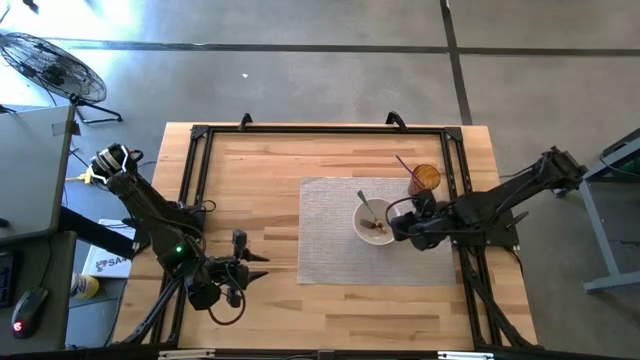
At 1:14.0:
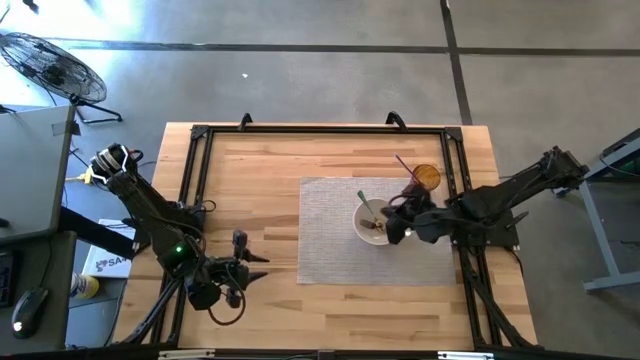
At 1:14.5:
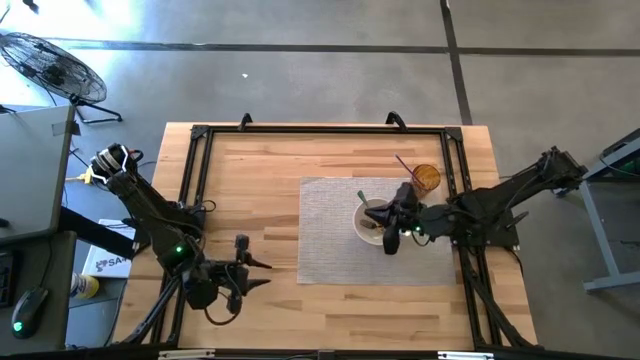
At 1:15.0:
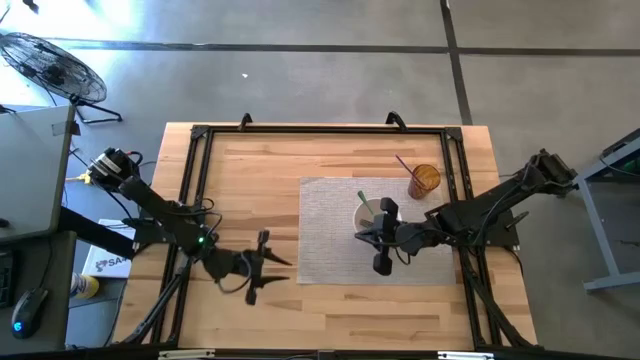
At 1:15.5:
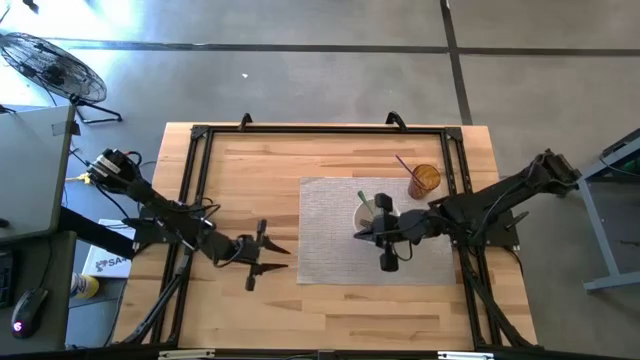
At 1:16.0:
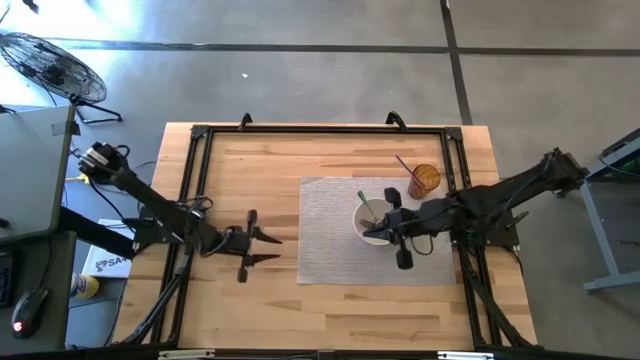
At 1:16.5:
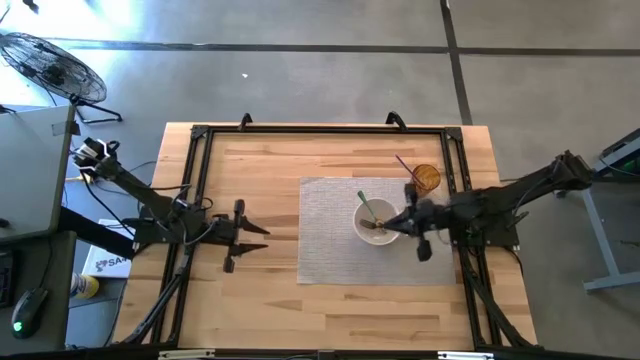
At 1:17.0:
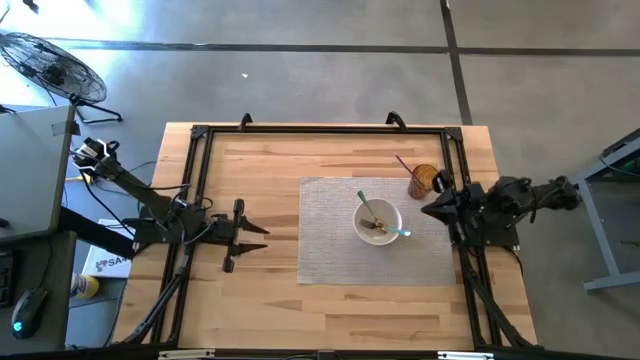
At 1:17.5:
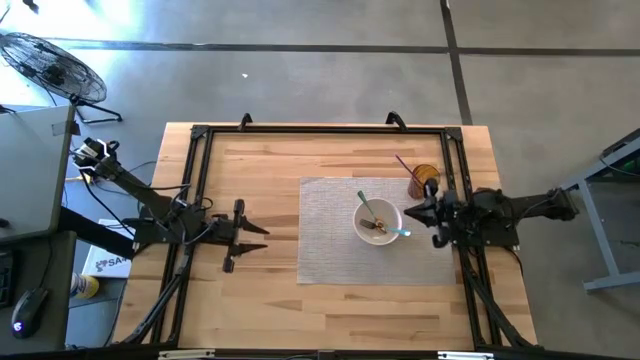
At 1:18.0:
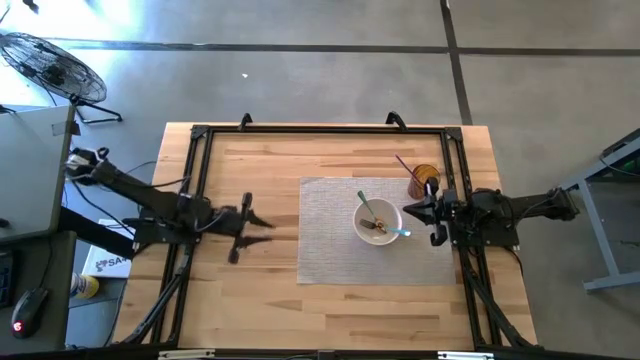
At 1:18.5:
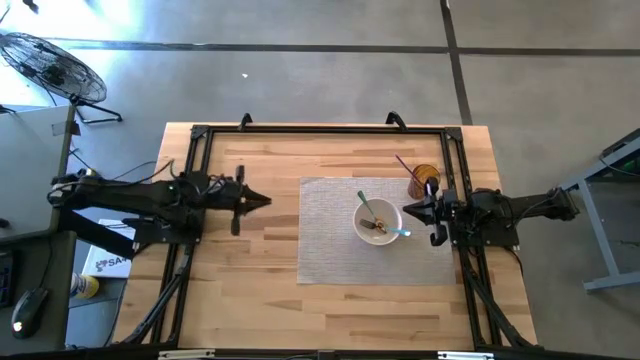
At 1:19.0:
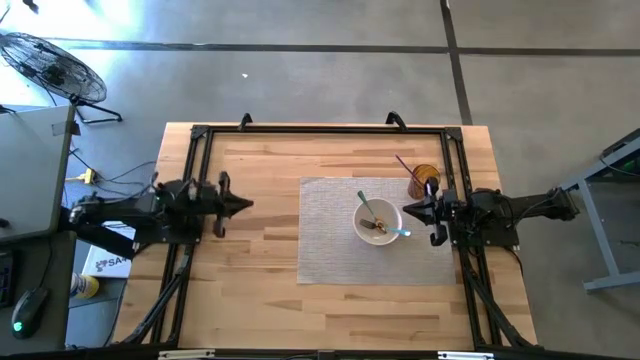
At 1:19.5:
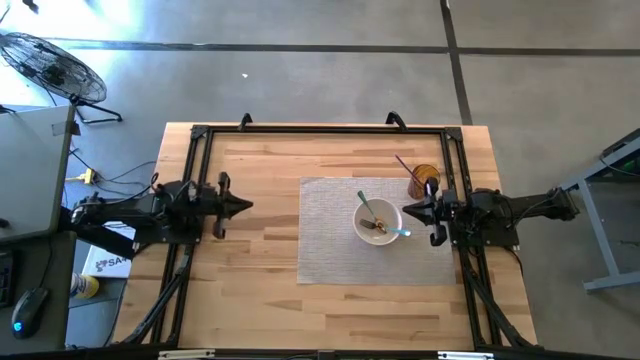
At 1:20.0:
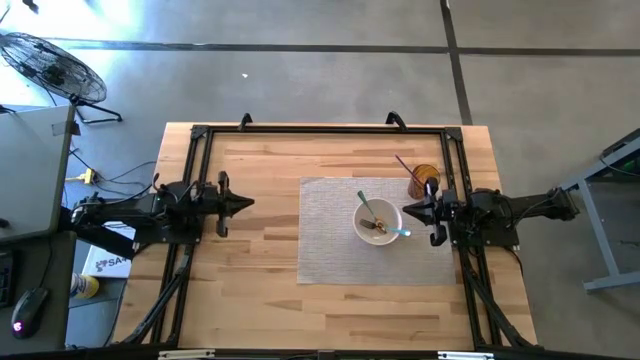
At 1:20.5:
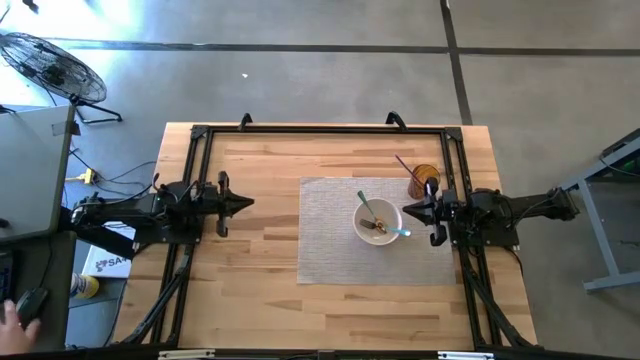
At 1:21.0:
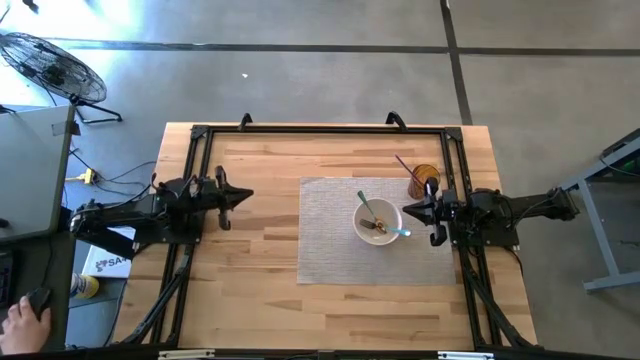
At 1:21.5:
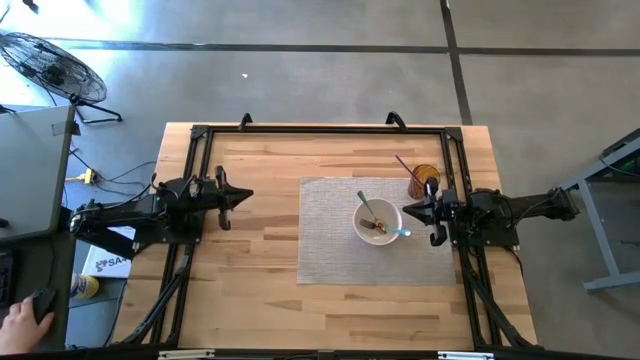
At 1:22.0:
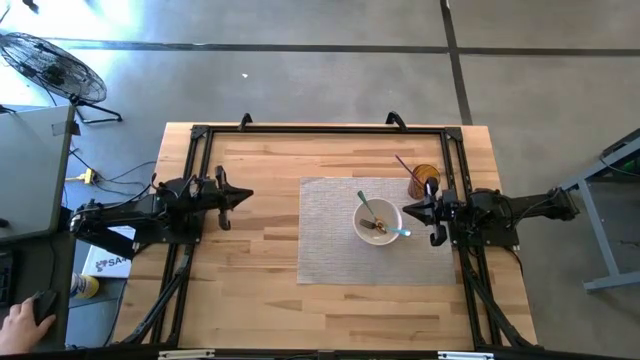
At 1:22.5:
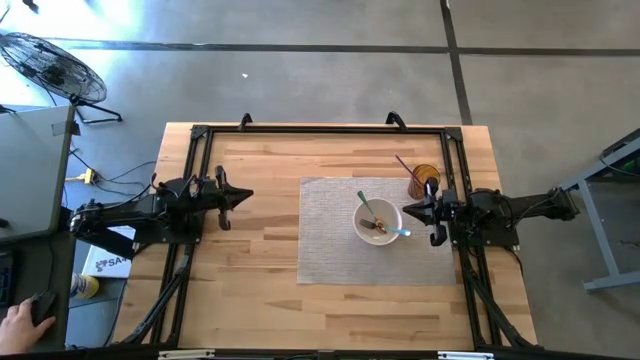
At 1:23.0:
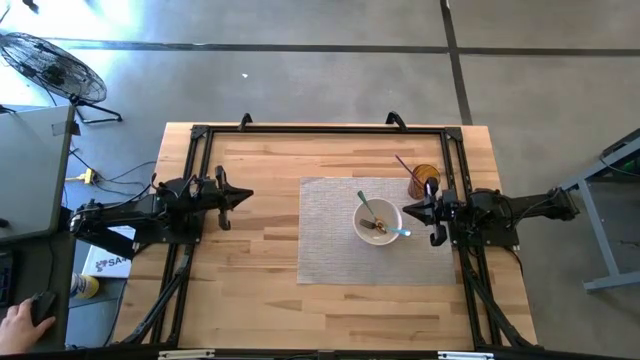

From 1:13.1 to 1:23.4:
Task: Pick & Place Utensil
Return to Home Position

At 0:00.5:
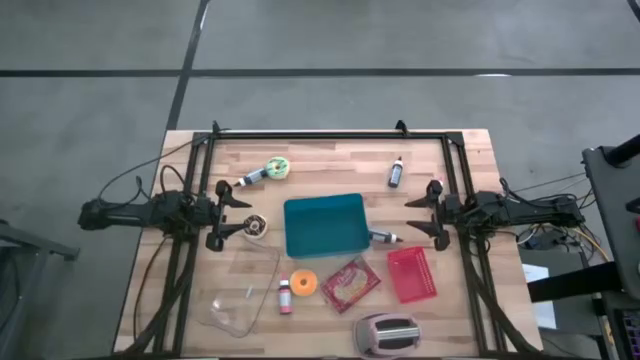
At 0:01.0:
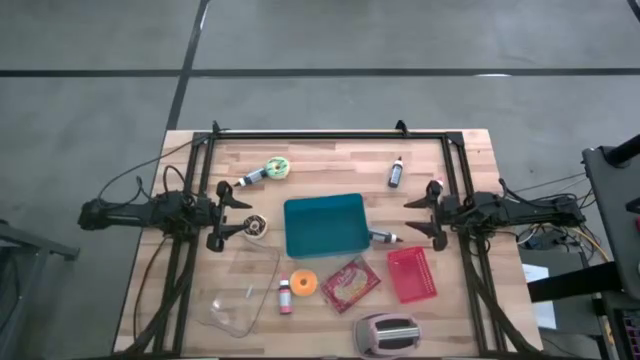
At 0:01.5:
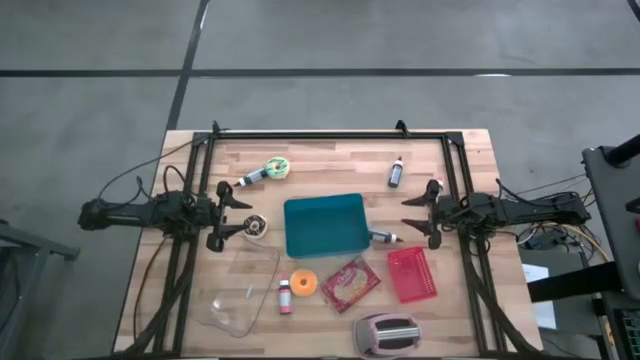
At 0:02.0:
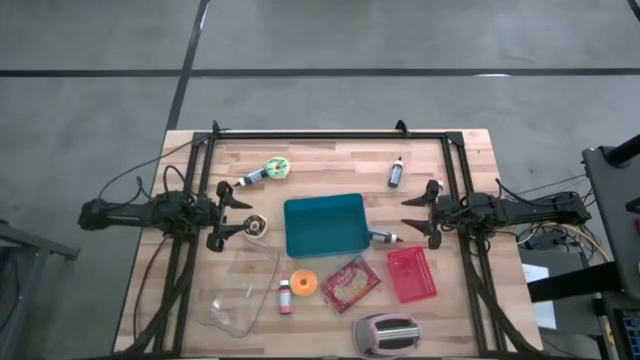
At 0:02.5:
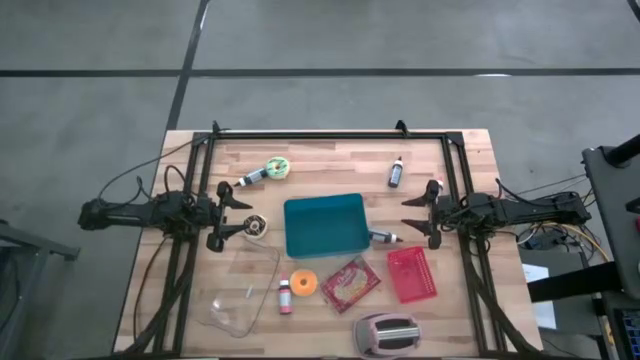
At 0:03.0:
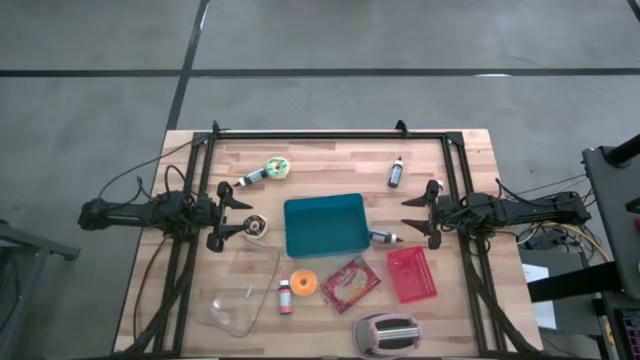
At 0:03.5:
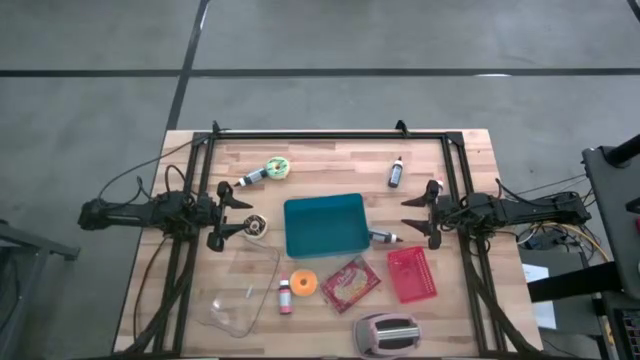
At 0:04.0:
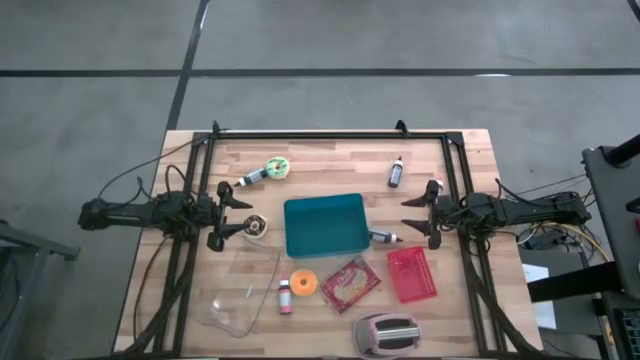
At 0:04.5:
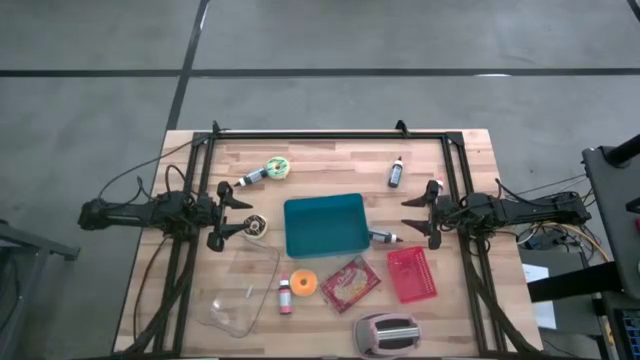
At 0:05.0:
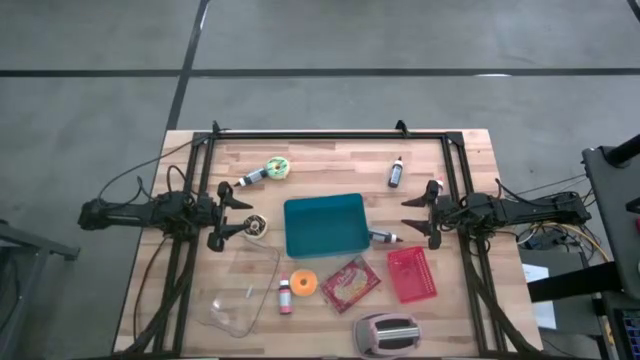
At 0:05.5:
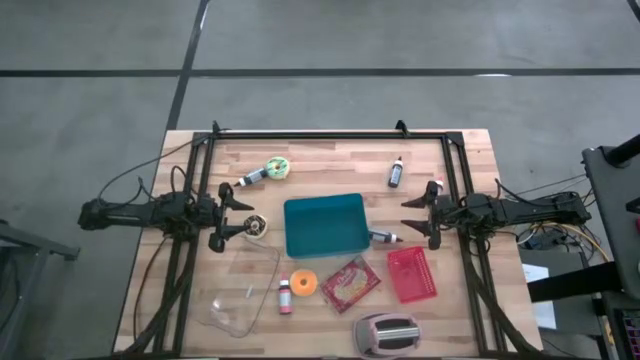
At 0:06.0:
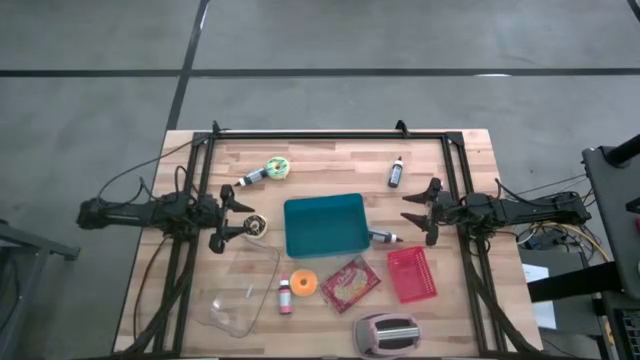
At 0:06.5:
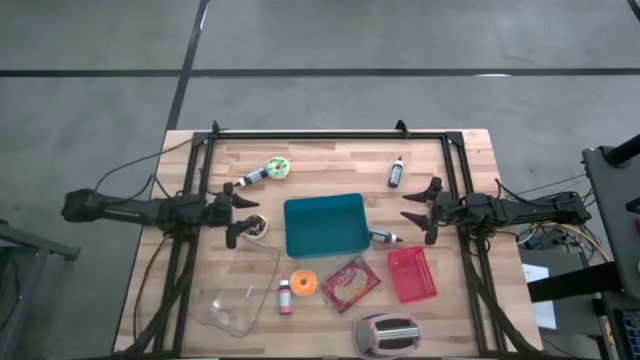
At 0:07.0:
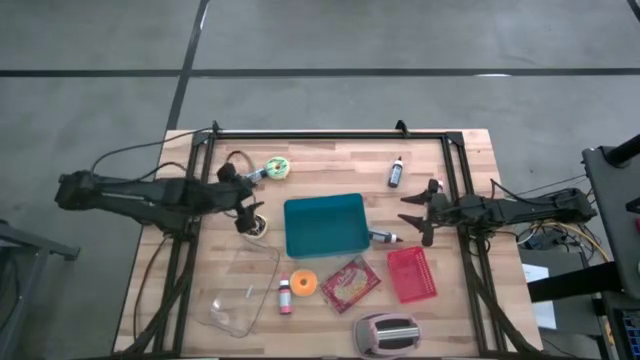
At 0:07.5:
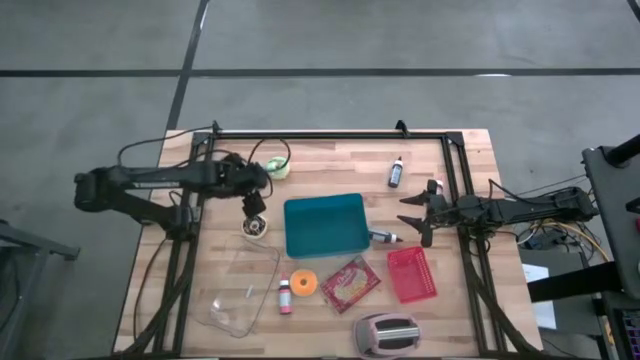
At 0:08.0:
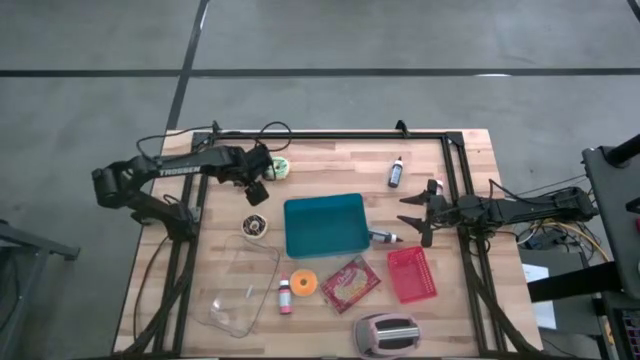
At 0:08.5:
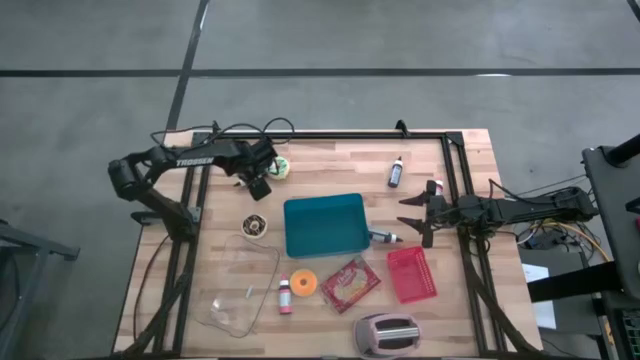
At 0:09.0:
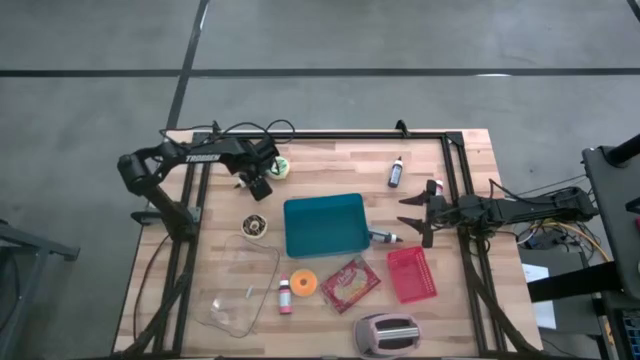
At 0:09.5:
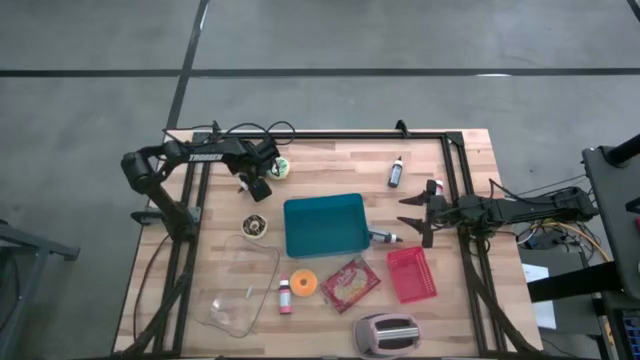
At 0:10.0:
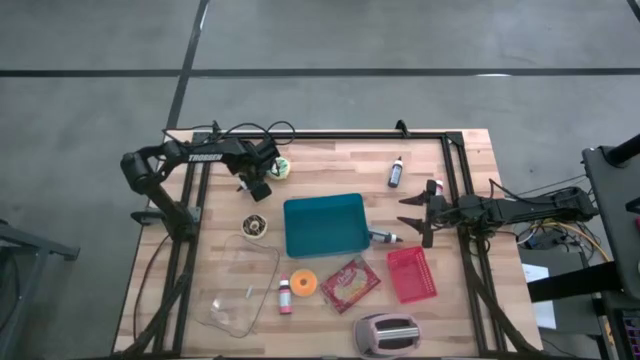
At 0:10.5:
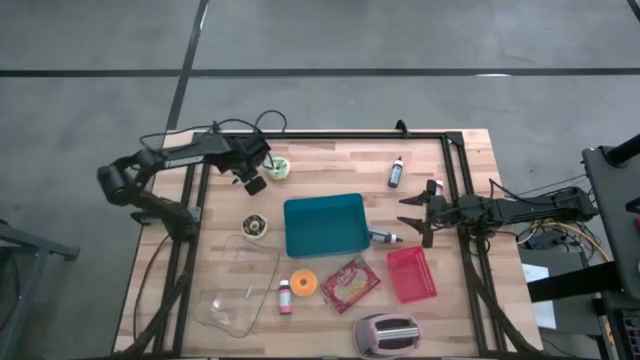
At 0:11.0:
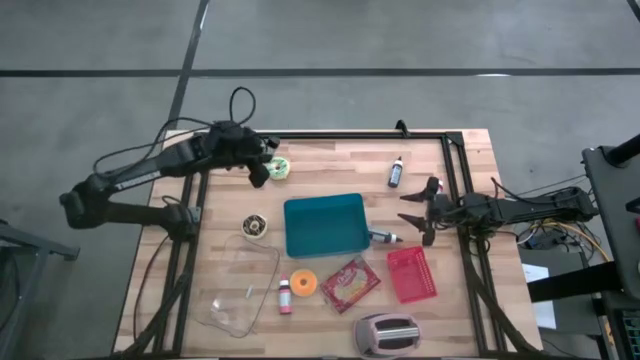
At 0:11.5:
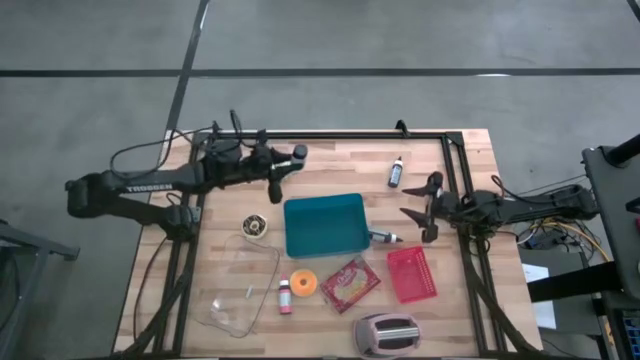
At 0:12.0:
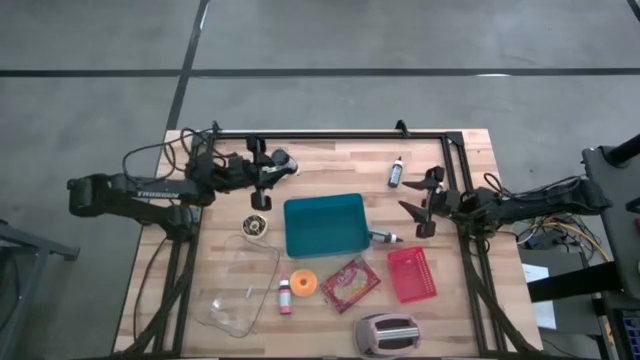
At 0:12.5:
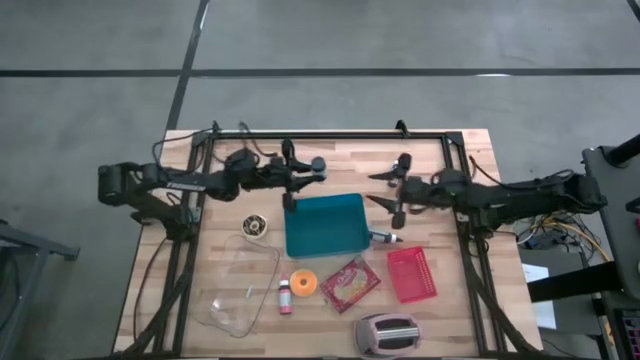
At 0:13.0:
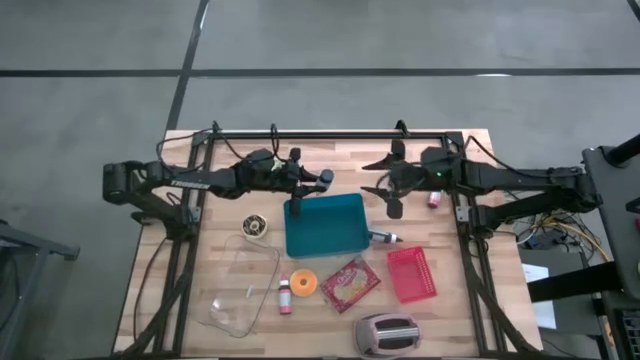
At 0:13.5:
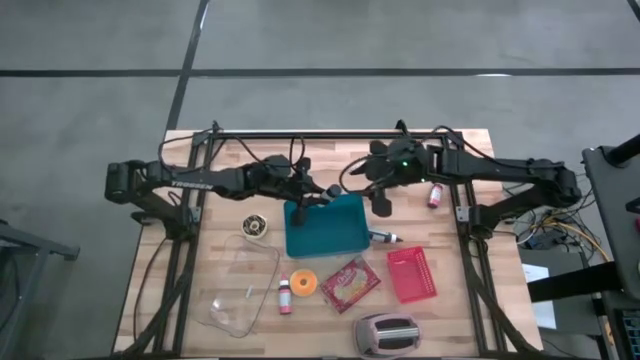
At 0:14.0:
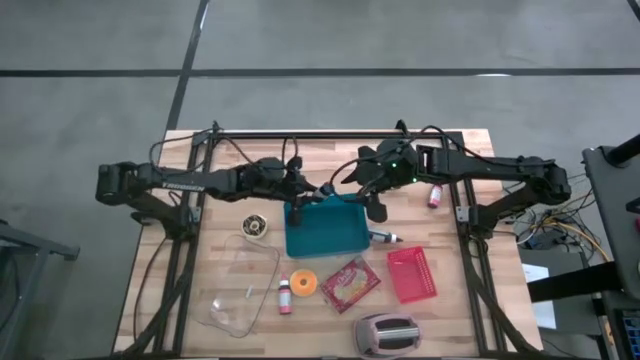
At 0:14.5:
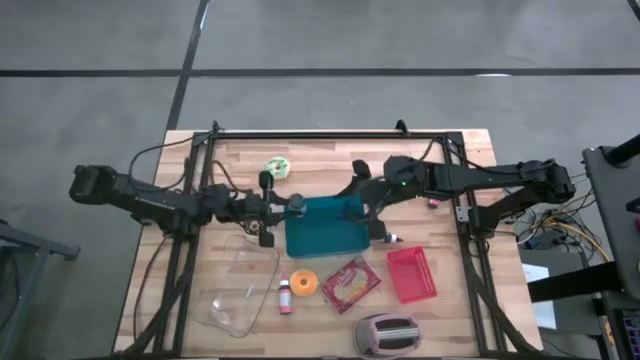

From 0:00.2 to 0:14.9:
Task: Pick & Place Food Item
Put the top left black food coloring bottle into the blue bin
